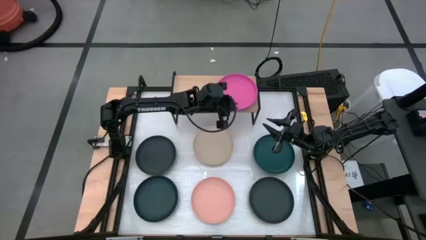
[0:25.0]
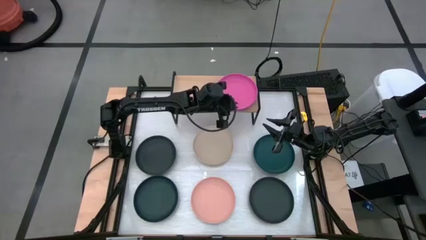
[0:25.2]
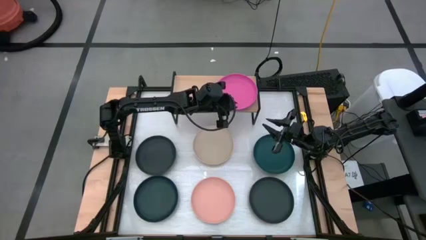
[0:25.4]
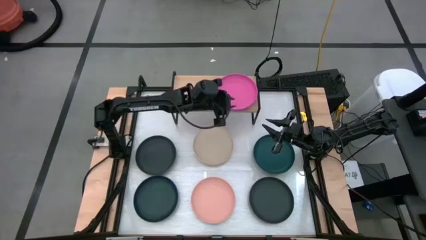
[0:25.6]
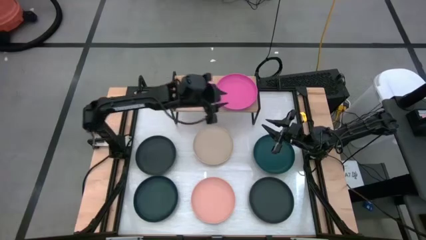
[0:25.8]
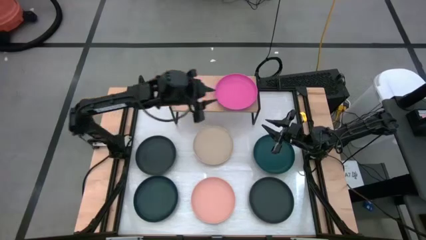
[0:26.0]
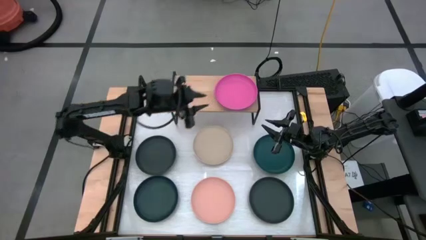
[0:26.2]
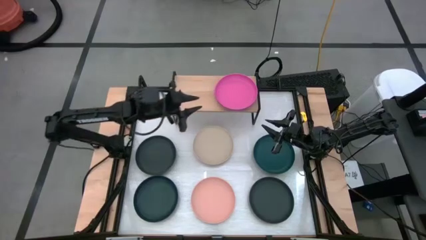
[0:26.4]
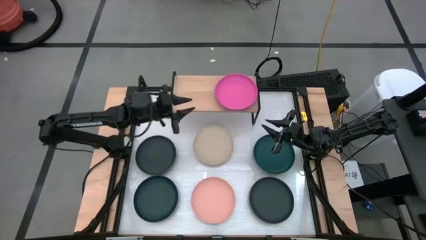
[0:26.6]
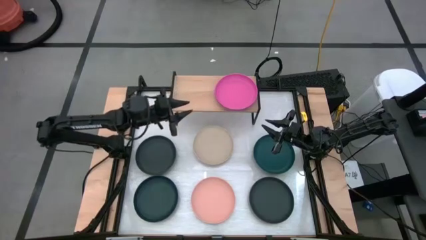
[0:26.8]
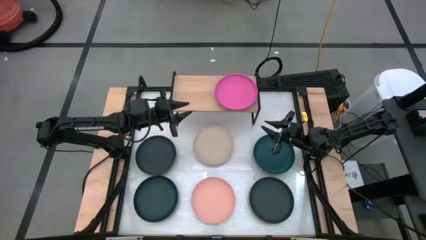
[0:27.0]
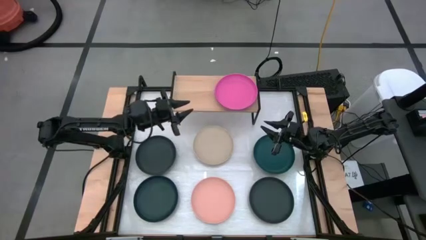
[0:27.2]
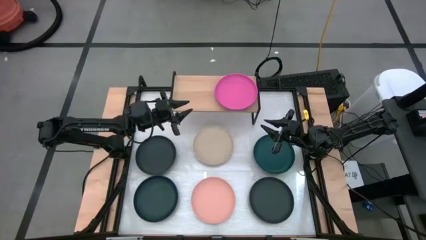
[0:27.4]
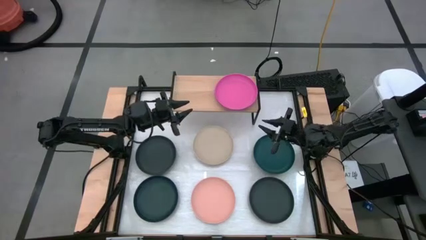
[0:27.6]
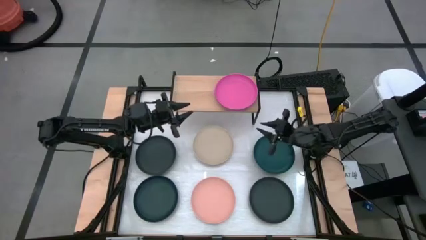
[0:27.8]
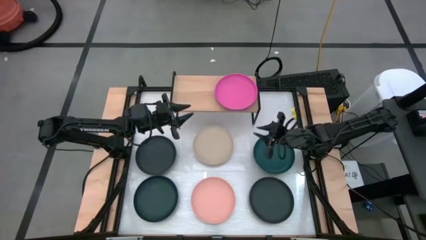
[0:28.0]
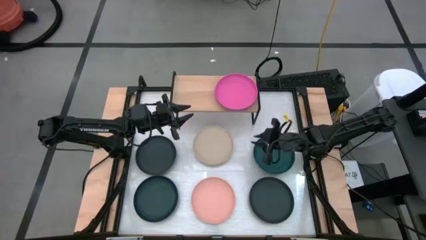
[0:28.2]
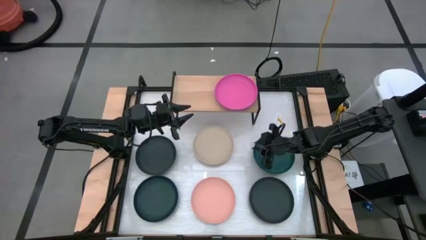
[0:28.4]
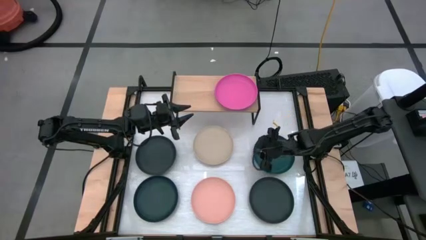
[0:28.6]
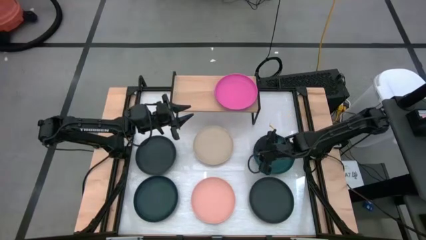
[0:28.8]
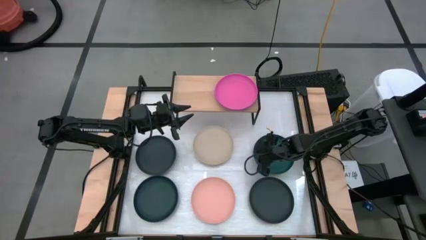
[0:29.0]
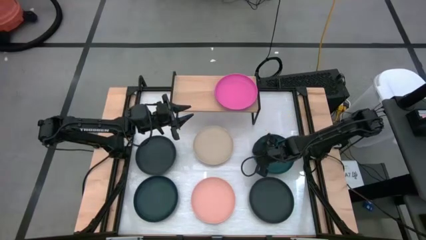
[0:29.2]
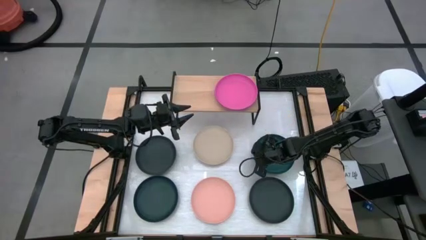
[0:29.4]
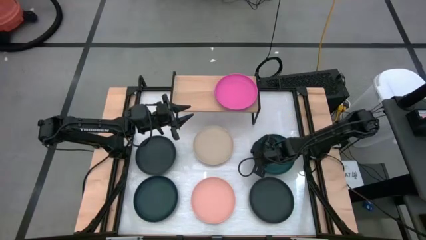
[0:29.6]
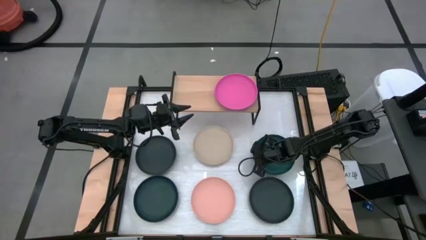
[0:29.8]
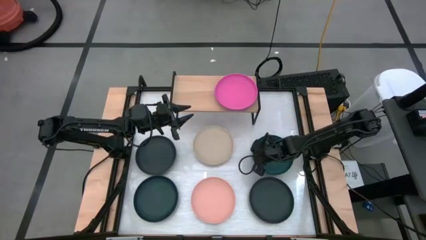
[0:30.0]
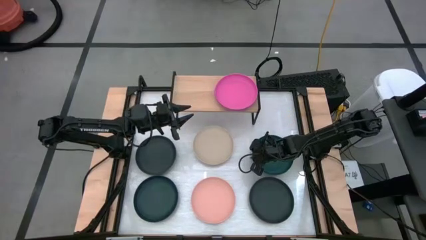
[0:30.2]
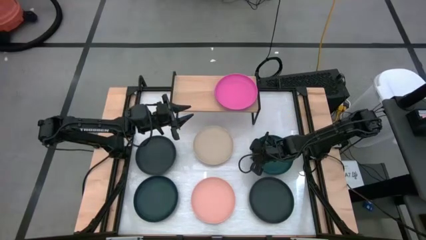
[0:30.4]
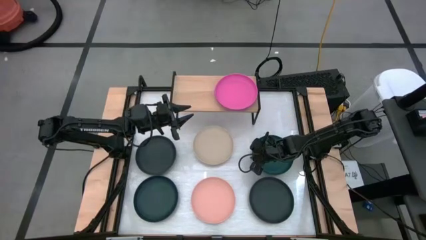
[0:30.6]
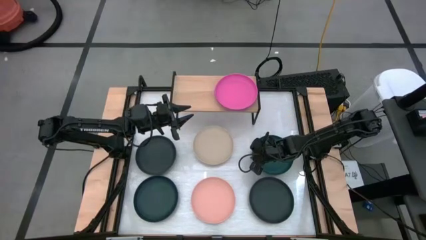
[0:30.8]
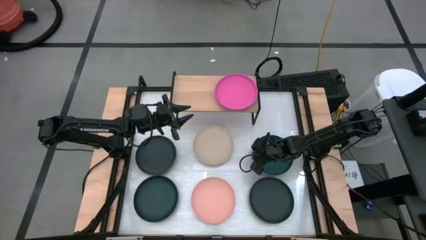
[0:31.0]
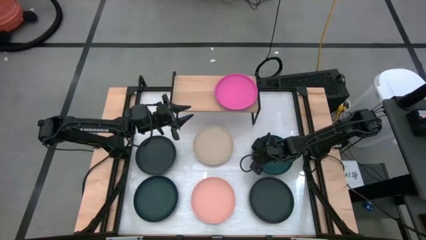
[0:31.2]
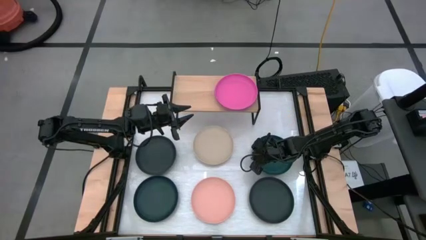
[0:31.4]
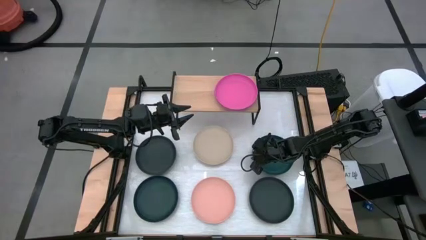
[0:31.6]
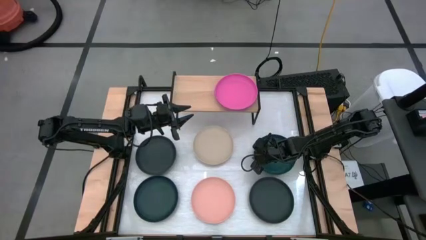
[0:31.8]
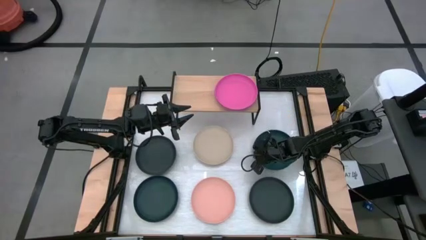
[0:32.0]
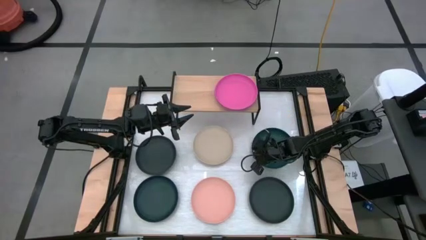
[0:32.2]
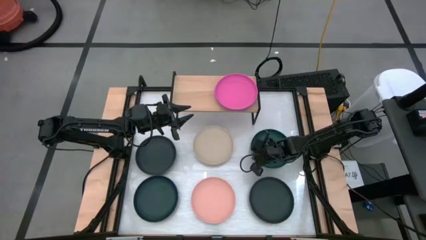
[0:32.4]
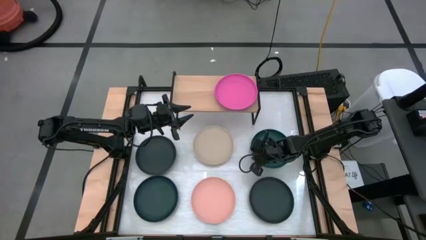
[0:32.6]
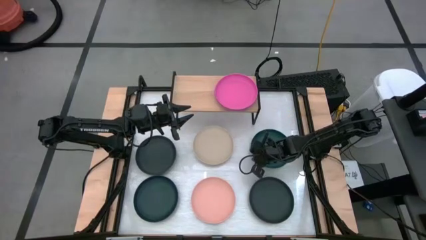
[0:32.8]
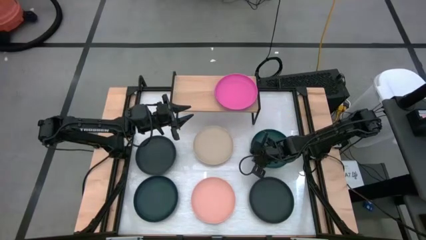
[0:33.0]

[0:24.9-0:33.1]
Task: Place and stack plates onto a shelf
Stack the right dark green plate on top of the pink plate on the shelf

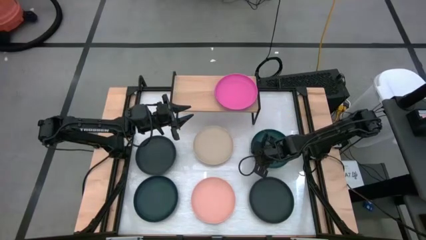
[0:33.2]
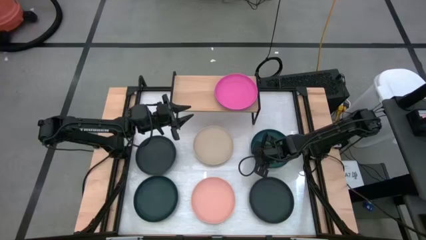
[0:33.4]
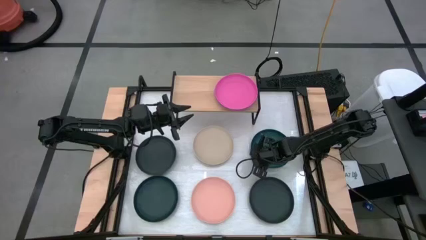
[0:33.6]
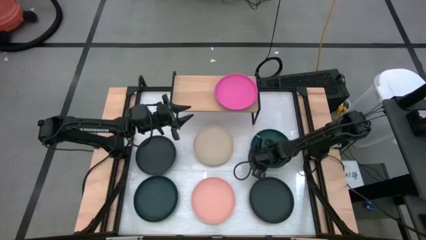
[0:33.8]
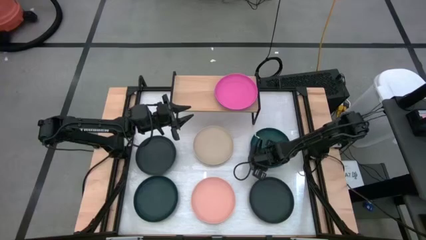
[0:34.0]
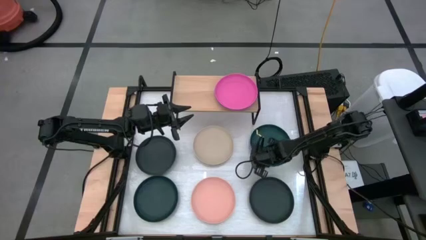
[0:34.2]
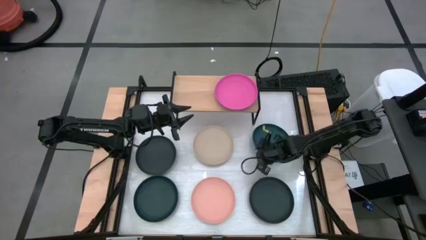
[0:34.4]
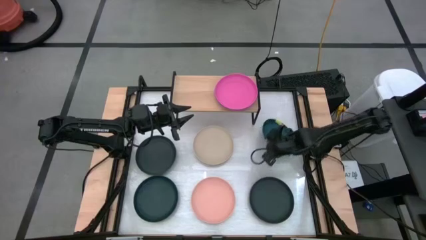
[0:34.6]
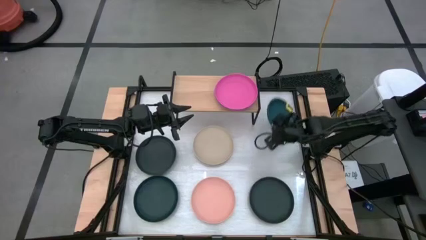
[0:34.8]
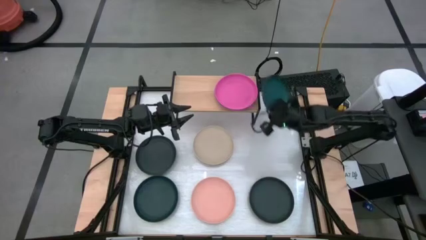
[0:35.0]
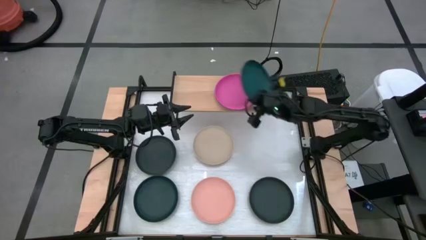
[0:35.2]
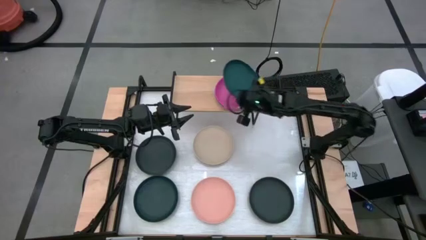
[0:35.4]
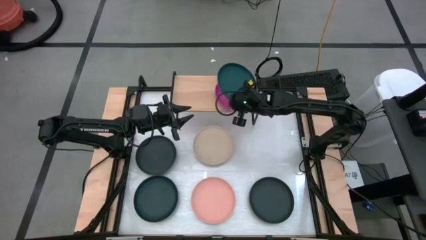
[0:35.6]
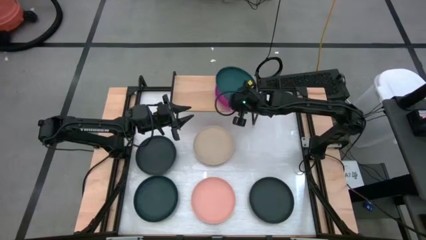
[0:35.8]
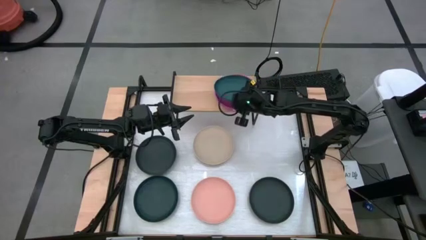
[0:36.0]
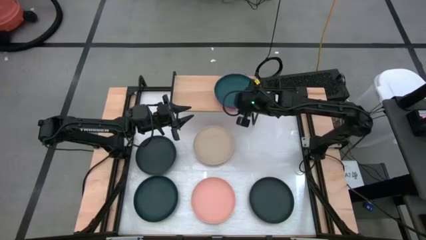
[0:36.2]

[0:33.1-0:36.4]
Stack the right dark green plate on top of the pink plate on the shelf

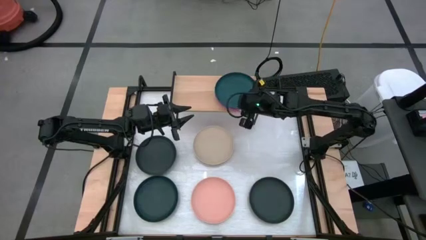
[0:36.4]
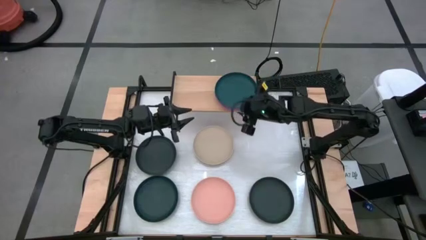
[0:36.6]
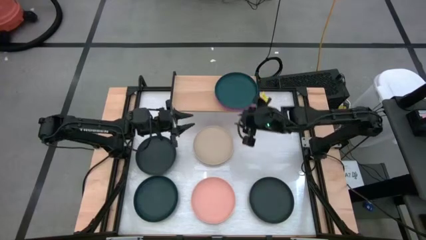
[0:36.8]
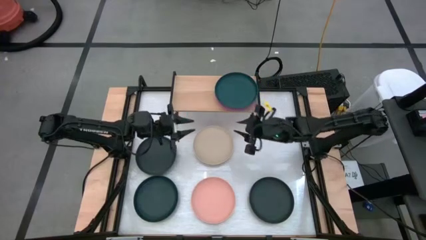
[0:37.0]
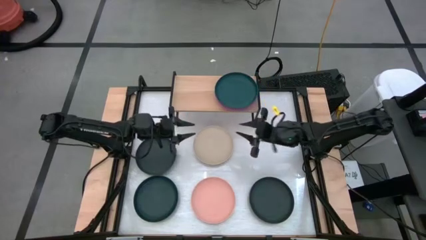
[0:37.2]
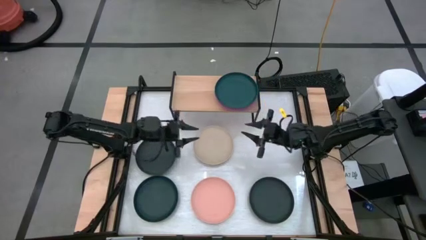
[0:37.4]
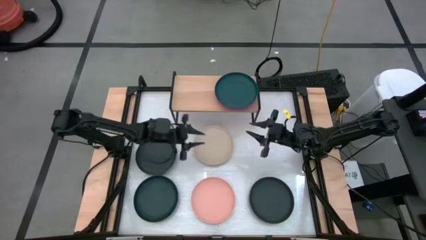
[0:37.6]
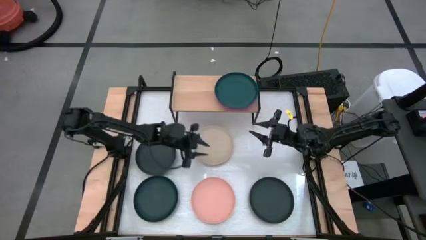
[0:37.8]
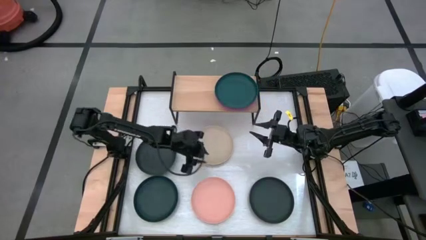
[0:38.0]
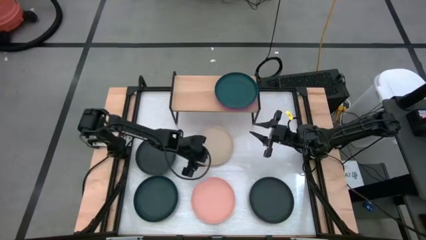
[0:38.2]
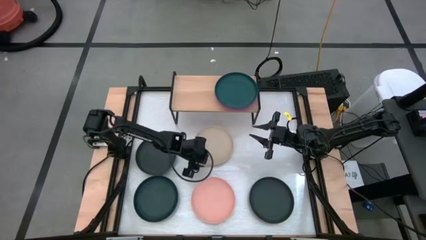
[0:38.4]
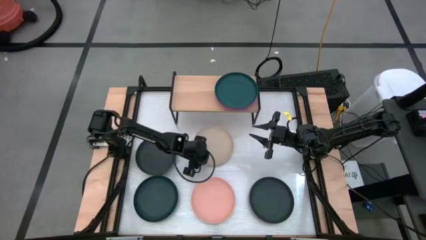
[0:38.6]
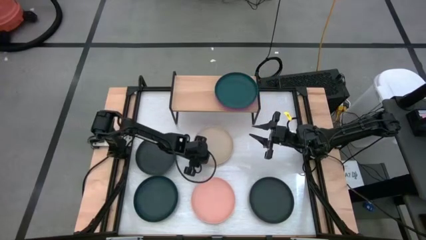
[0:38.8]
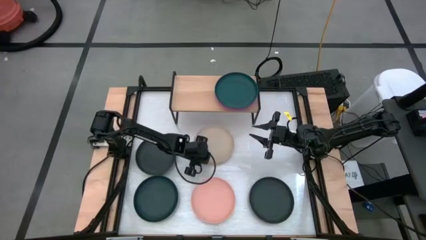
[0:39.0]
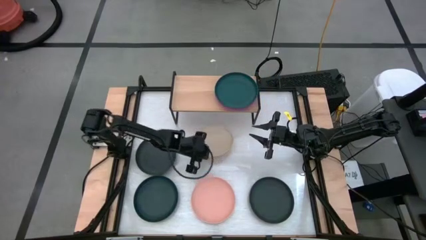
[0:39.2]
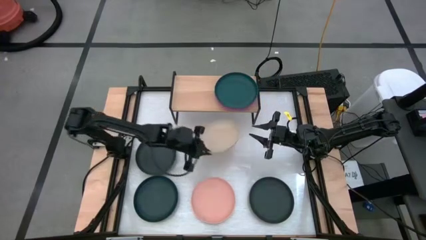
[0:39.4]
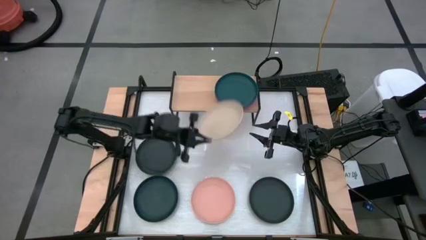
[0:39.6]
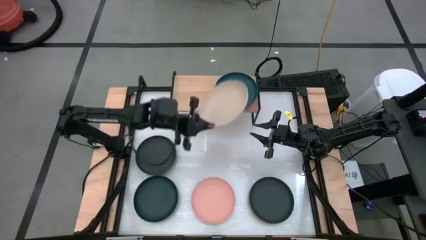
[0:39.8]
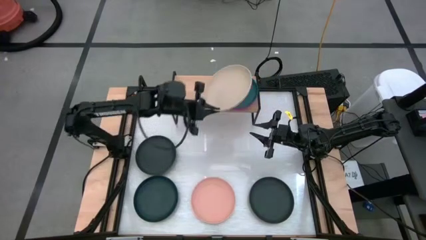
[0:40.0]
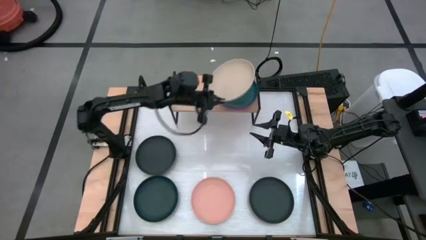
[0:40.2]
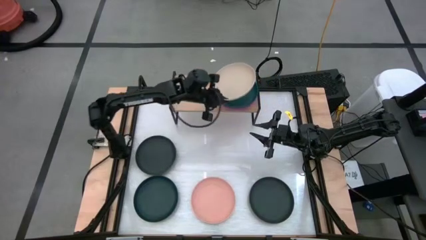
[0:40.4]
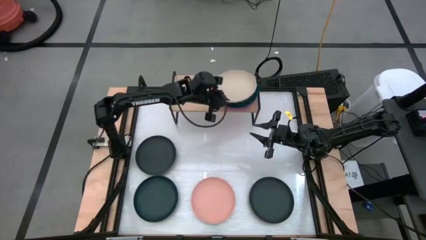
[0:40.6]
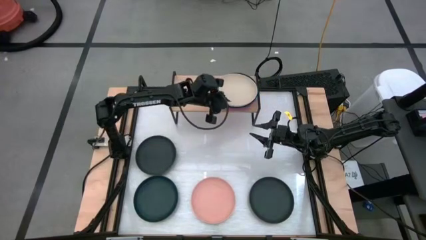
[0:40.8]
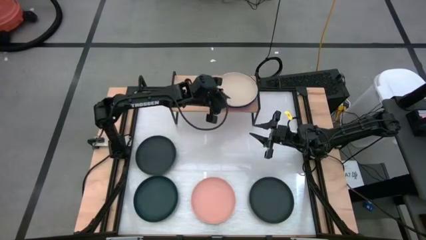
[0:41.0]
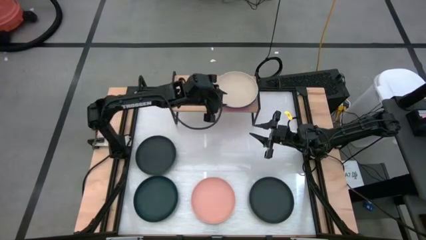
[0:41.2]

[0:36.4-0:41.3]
Stack the brown plate on top of the dark green plate on the shelf
